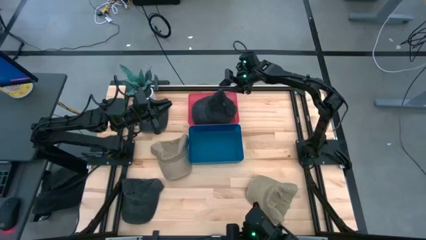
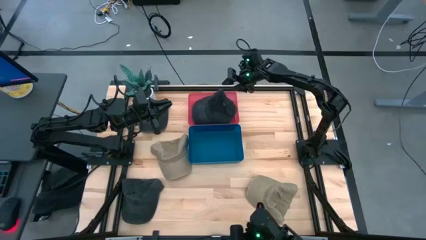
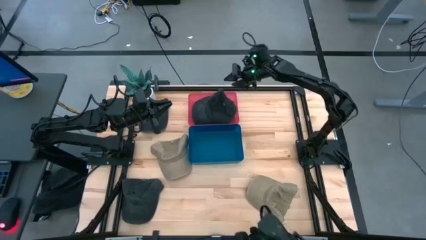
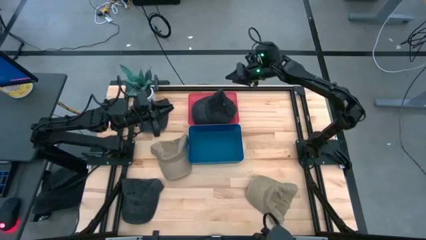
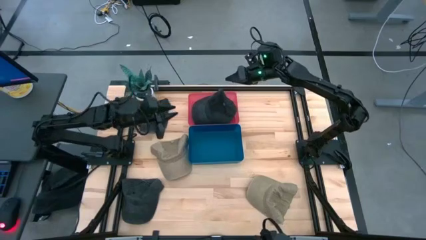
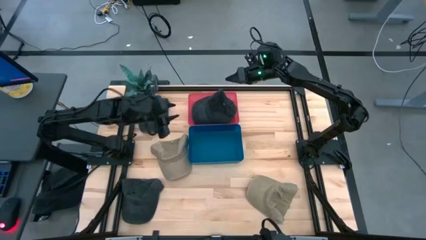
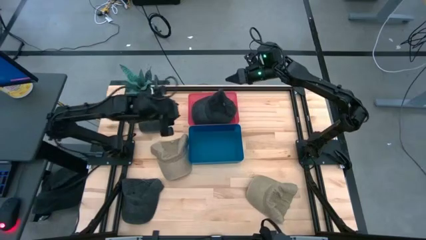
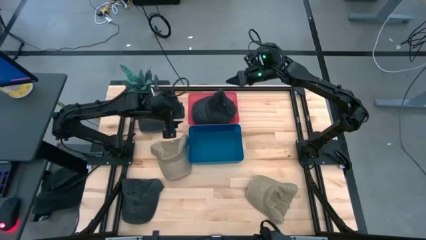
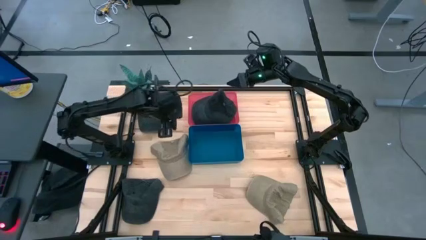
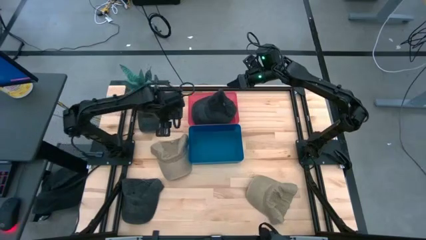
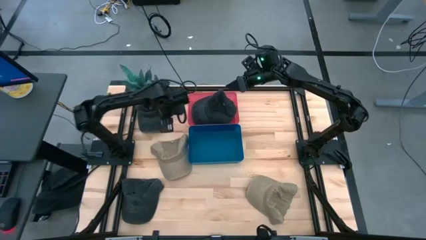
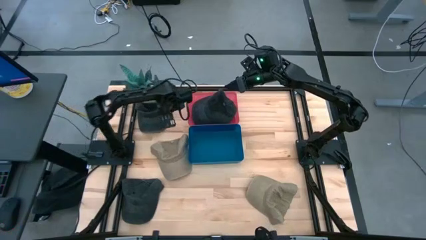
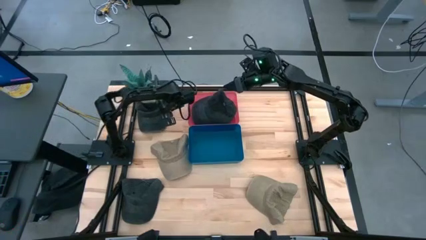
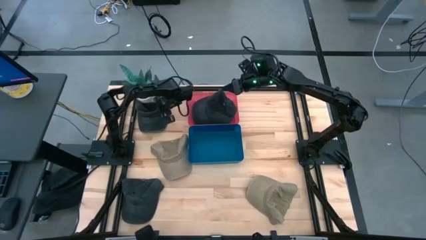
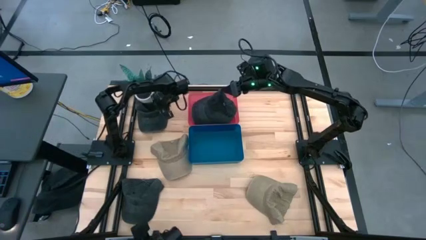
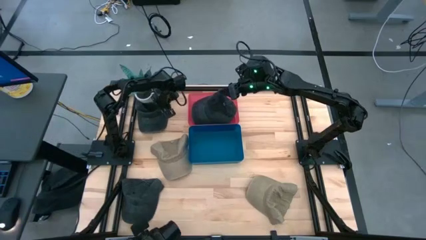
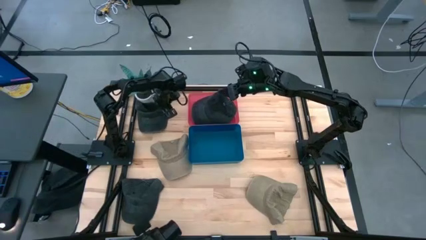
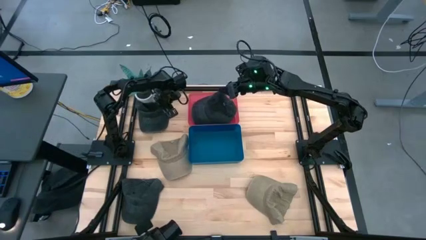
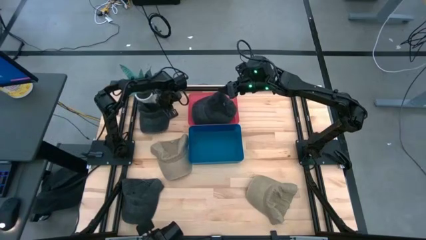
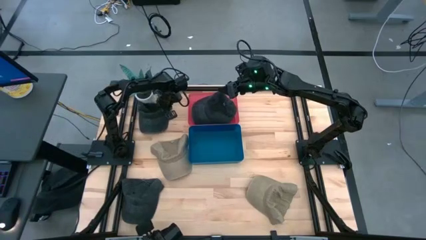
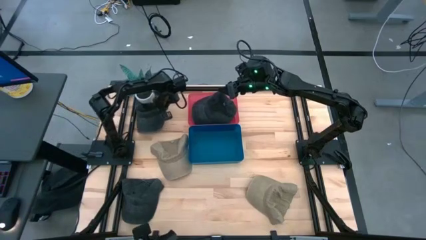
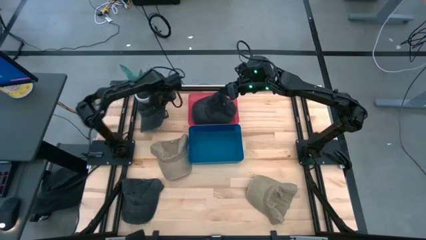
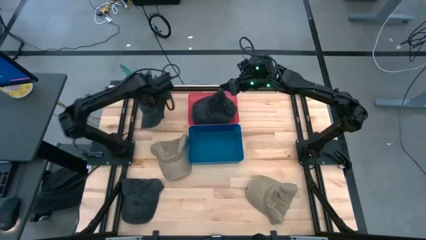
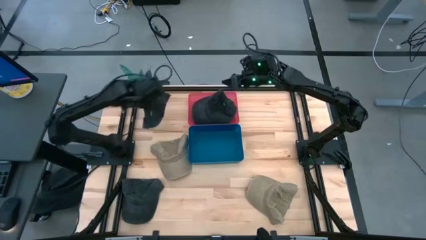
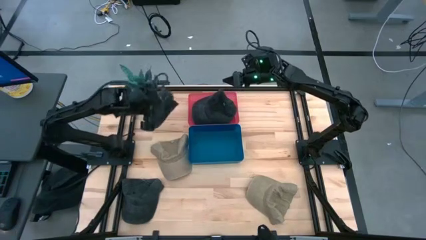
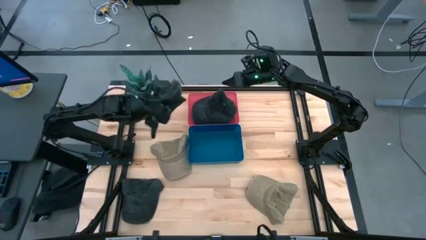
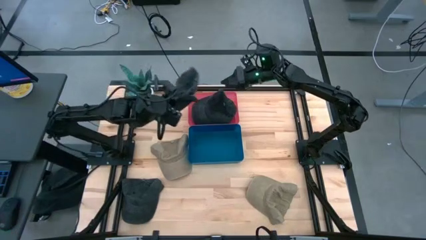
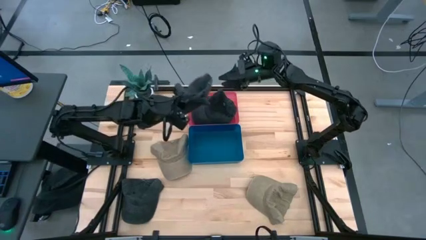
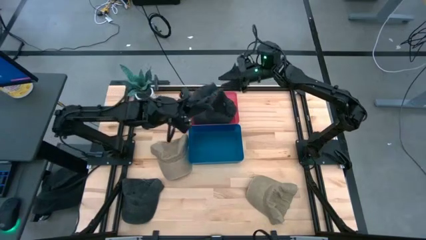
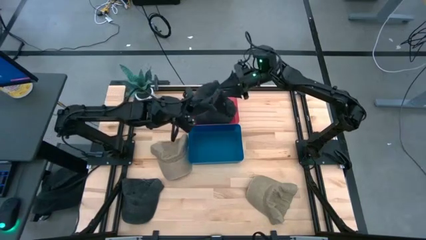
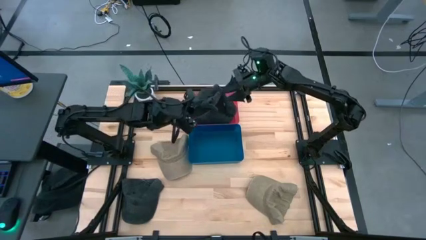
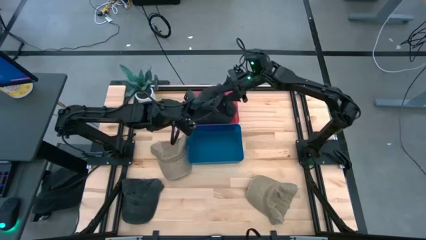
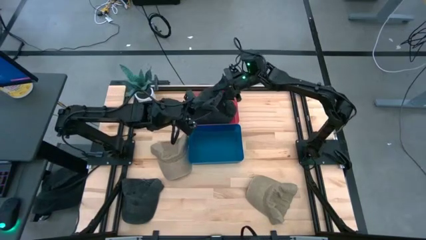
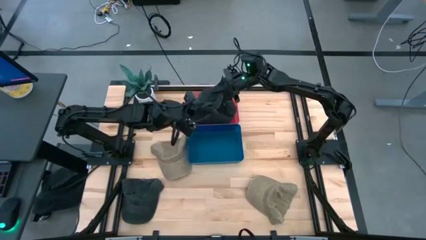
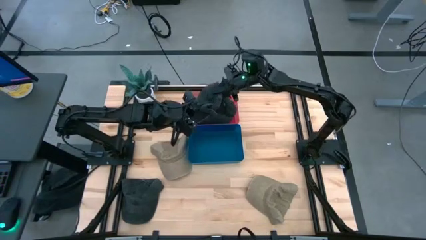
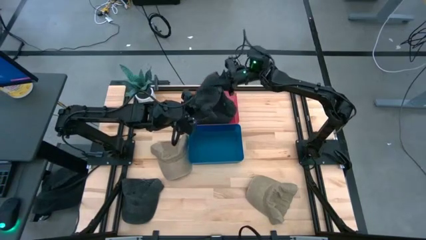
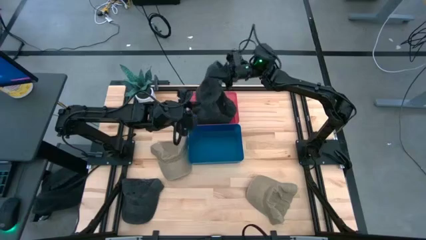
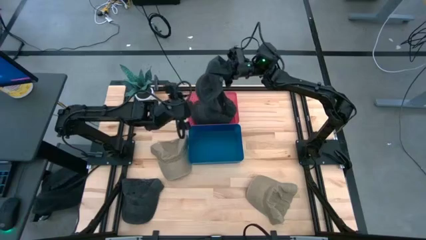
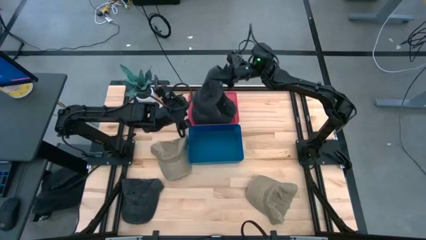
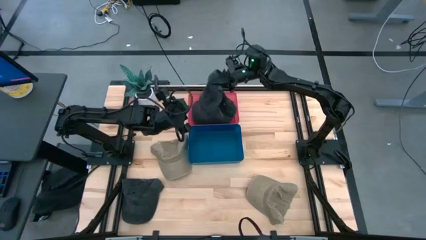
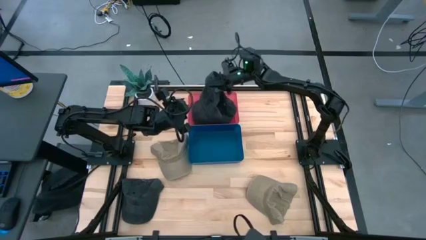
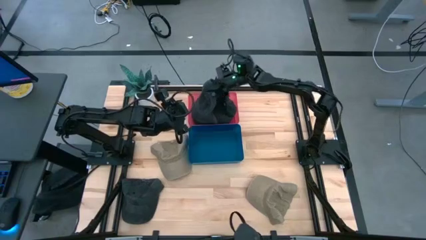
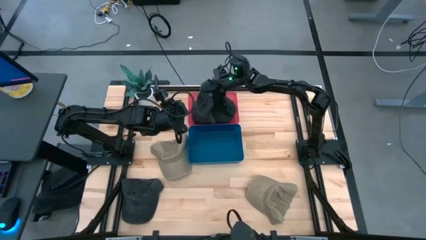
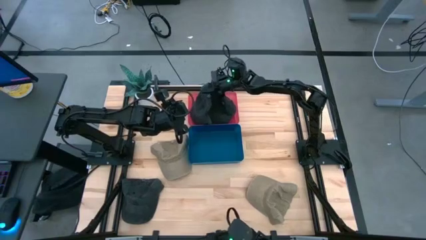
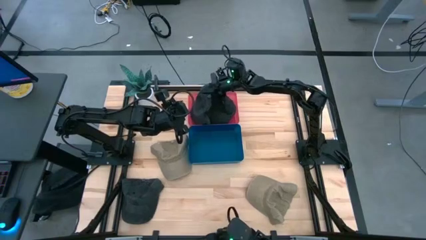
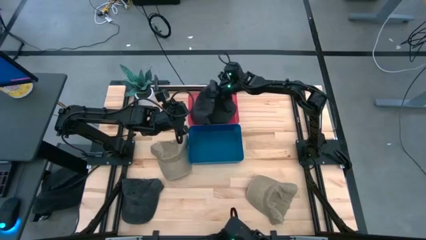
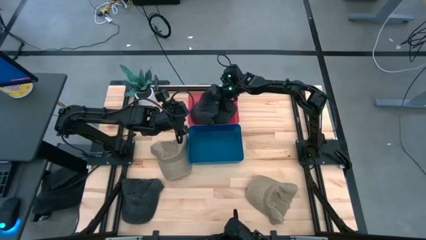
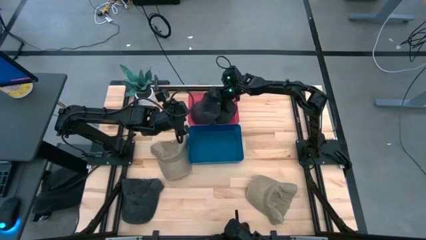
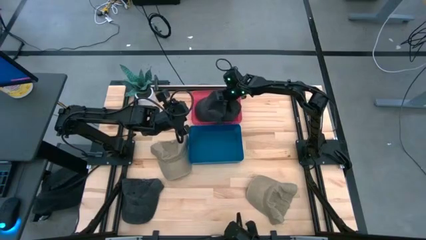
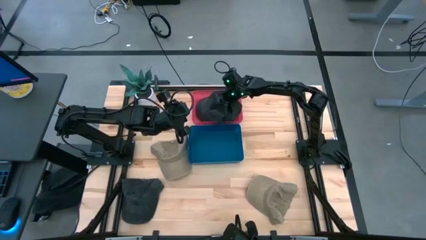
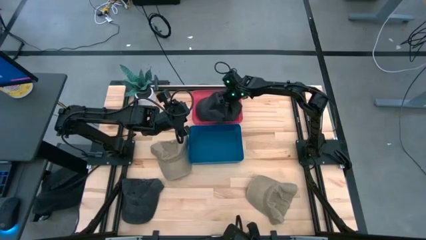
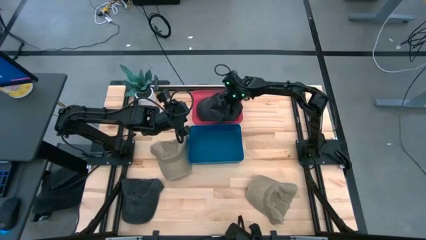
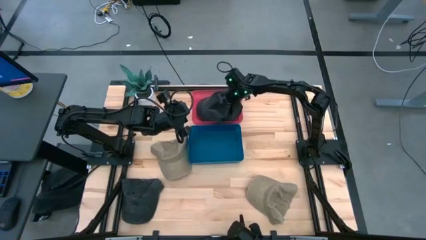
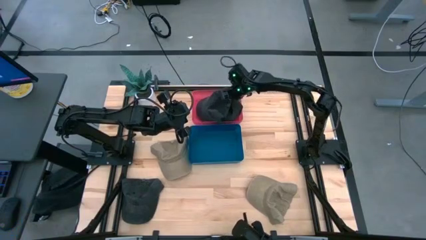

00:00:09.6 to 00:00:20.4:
Task: Pick & Place hat
Put the top black cap into the red bin

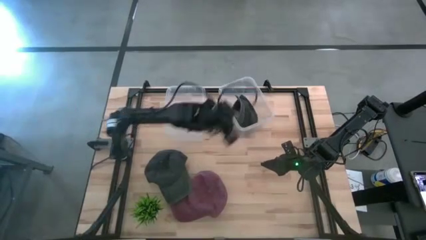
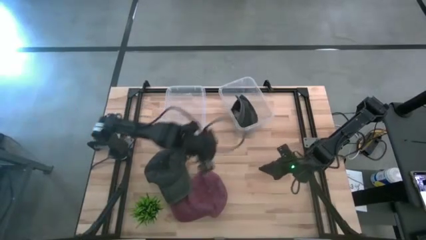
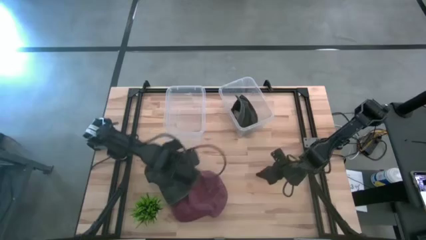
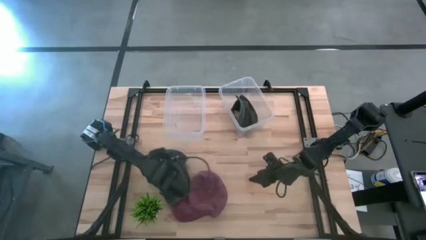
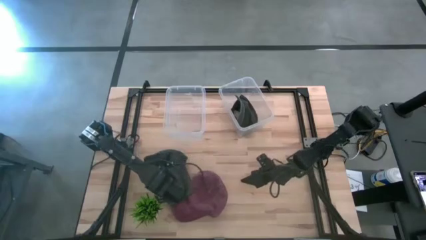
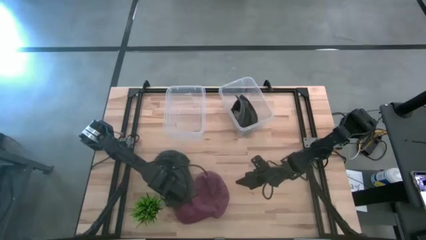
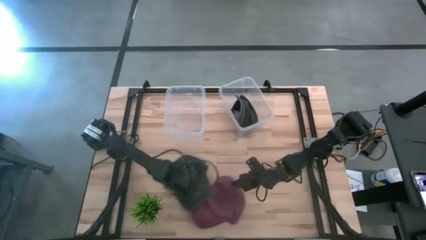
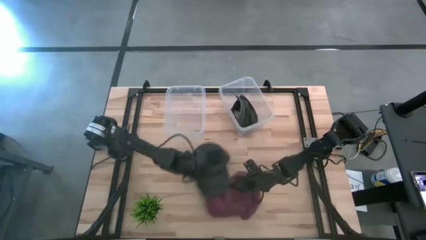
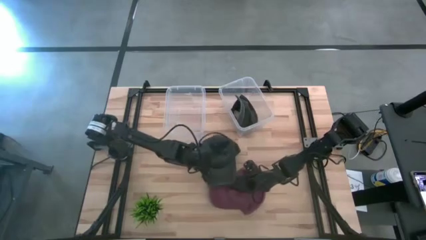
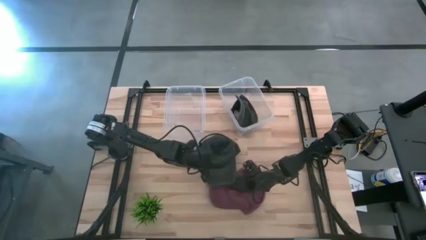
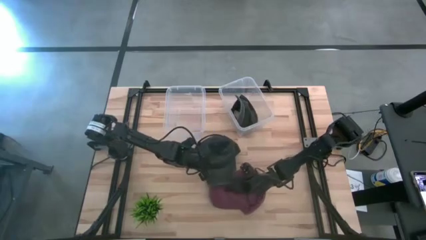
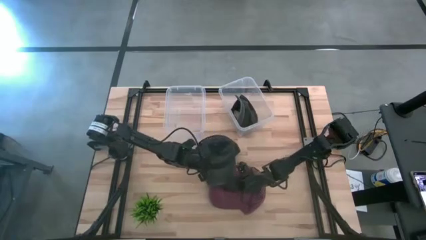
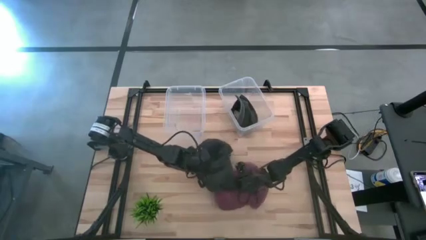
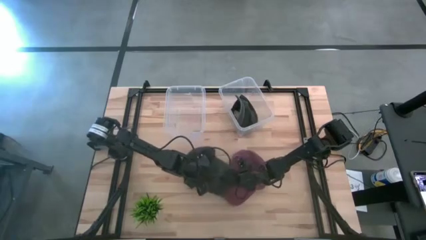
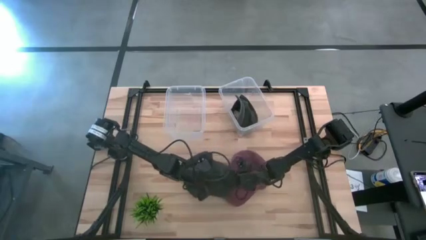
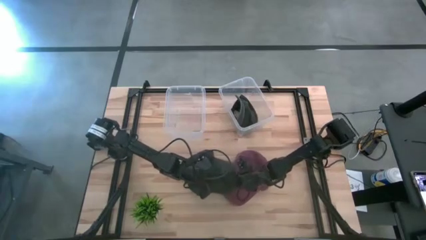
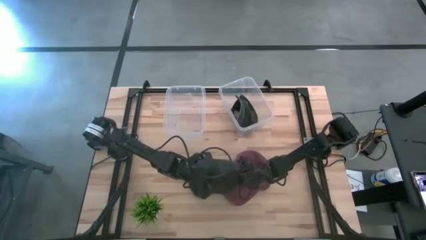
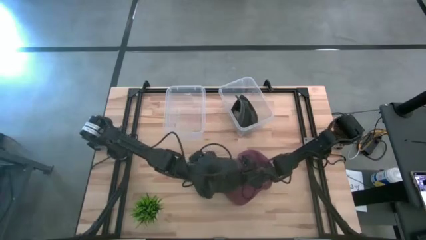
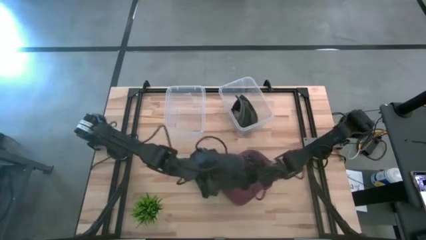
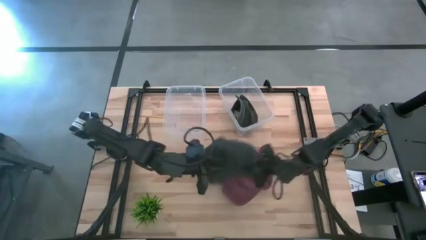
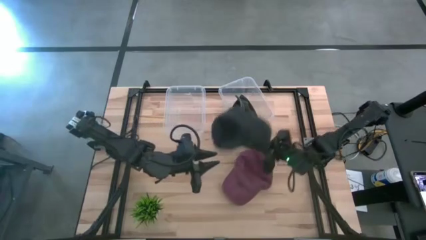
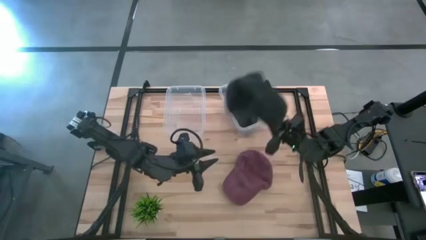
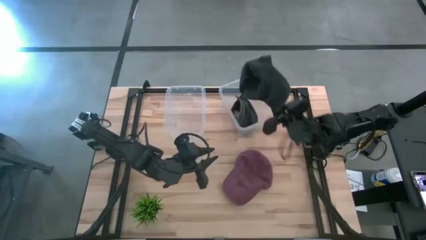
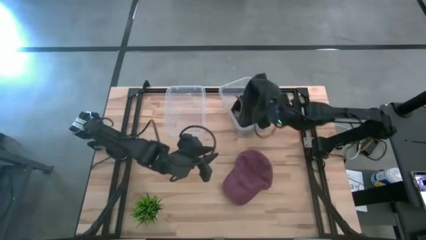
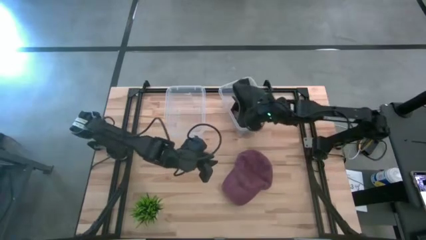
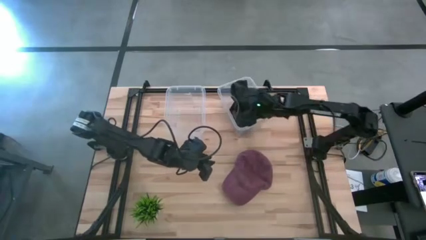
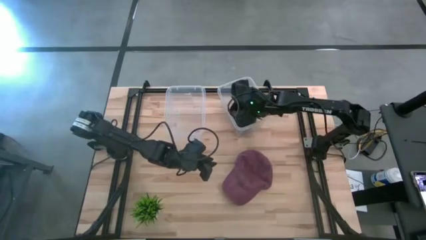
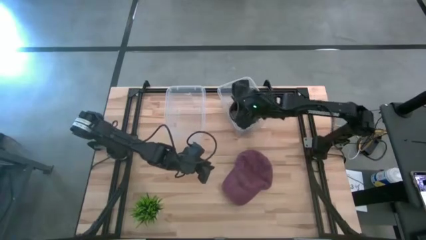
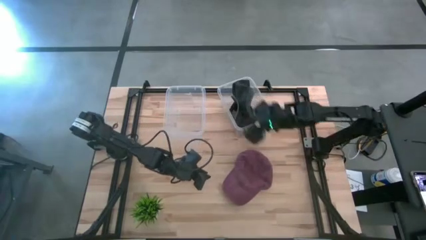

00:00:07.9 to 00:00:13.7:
Task: Pick & Place hat
Put the black cap into the right transparent bin
